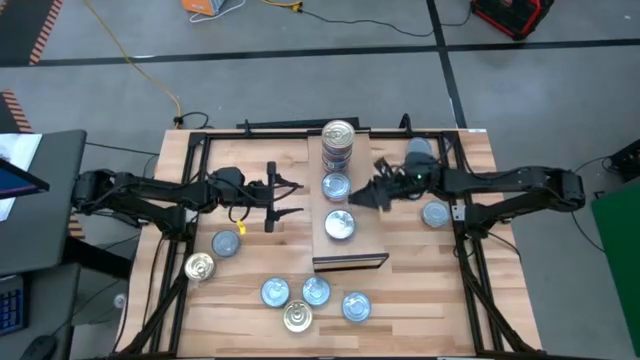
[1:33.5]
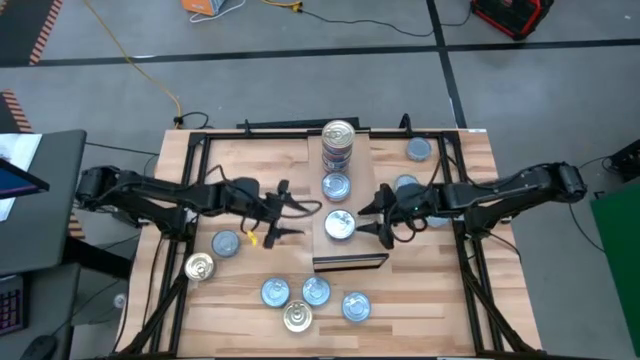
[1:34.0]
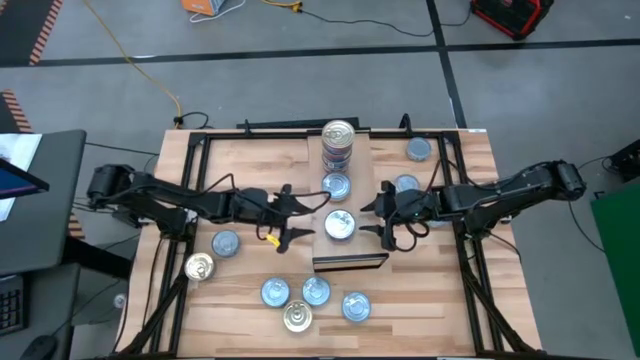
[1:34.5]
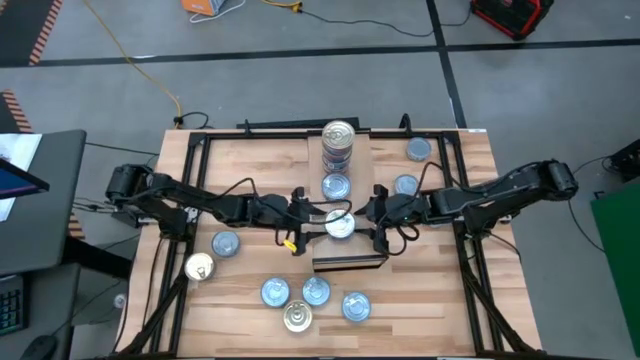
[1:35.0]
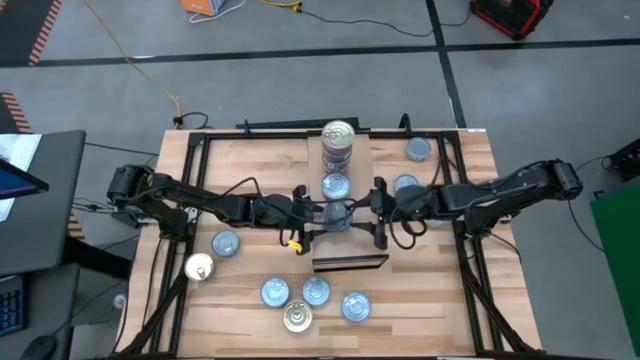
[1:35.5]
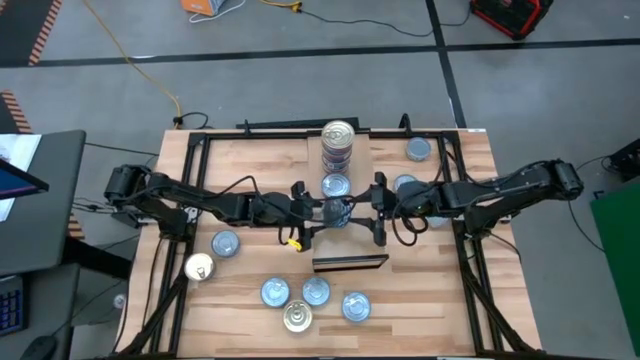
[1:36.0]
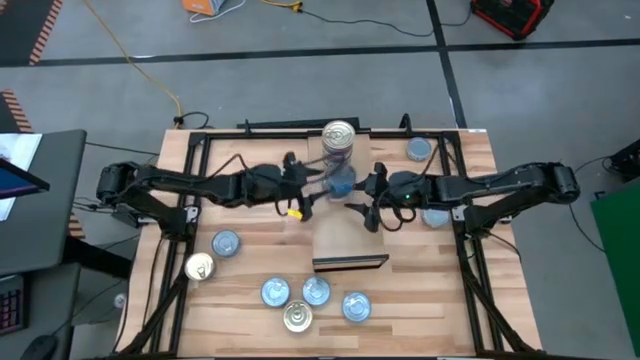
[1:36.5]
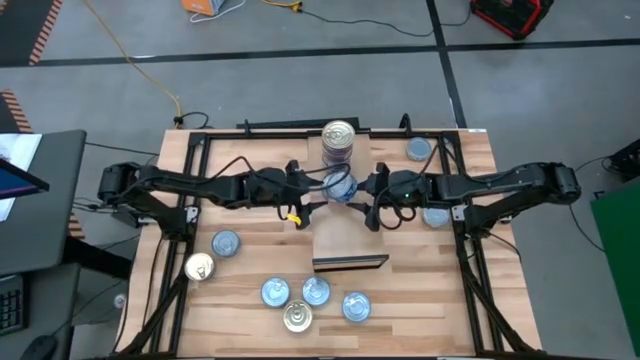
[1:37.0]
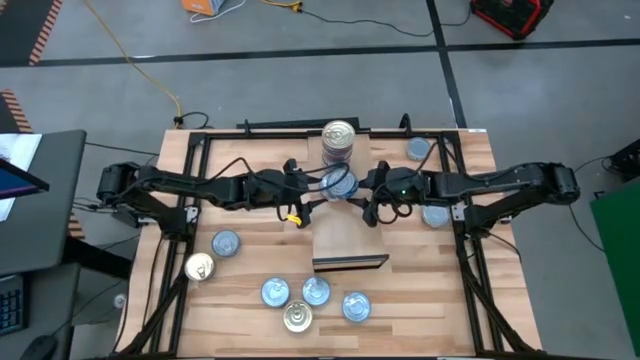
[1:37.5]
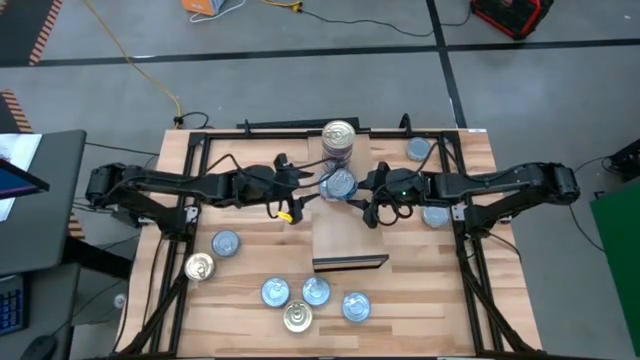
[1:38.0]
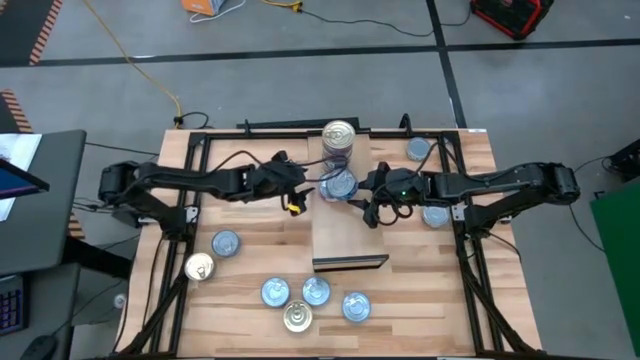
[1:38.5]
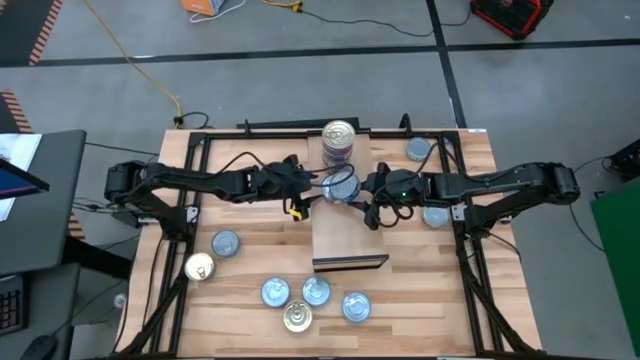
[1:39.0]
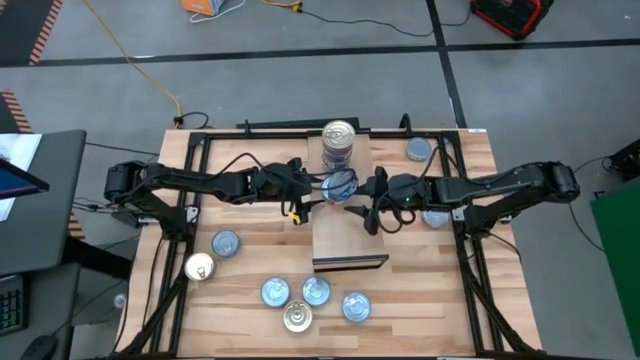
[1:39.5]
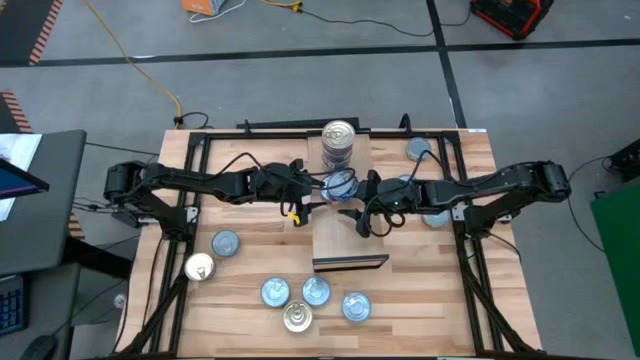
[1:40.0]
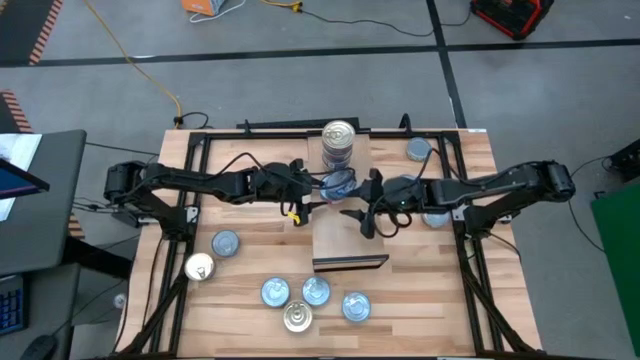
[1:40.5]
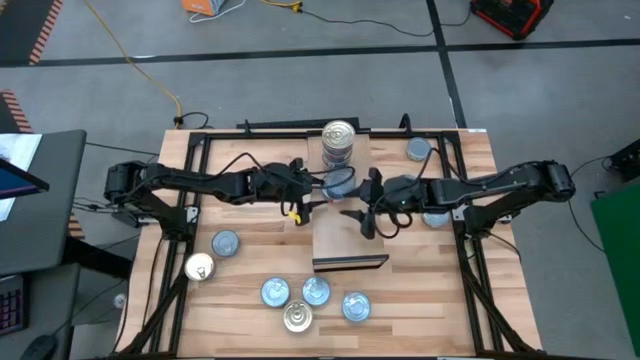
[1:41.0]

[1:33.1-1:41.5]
Task: Stack canned seafood by type on shelf
Stack the blue tuna can on the shelf on top of the red tuna can

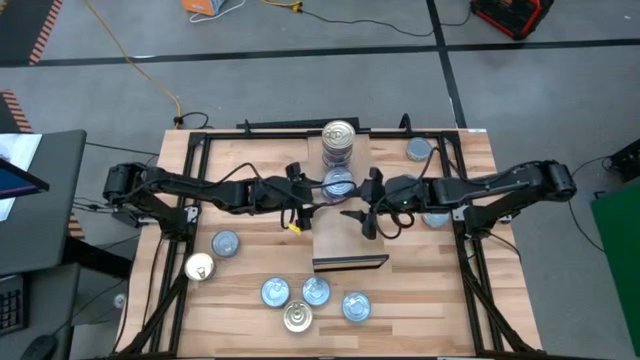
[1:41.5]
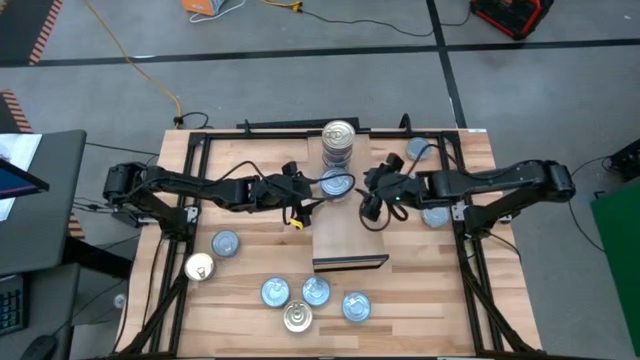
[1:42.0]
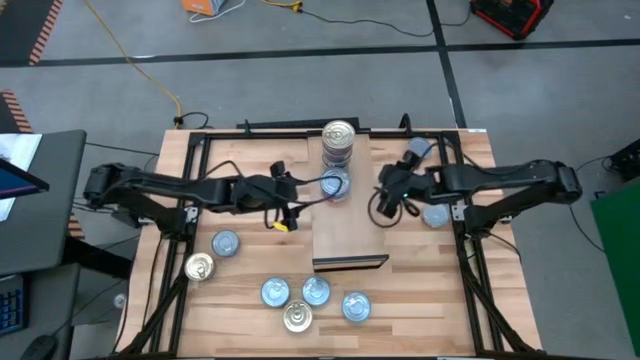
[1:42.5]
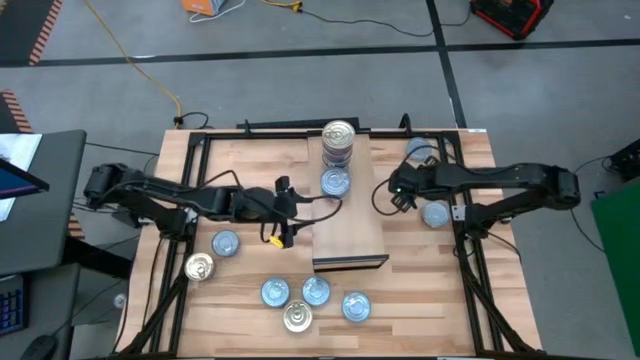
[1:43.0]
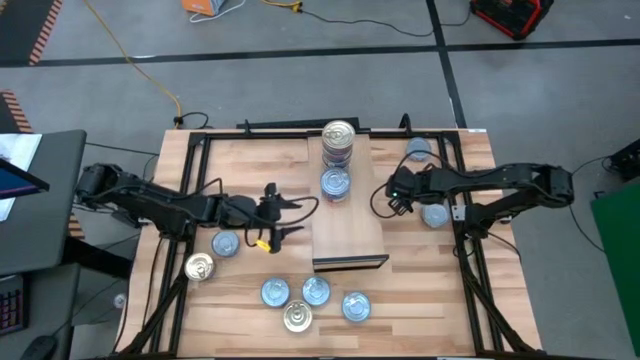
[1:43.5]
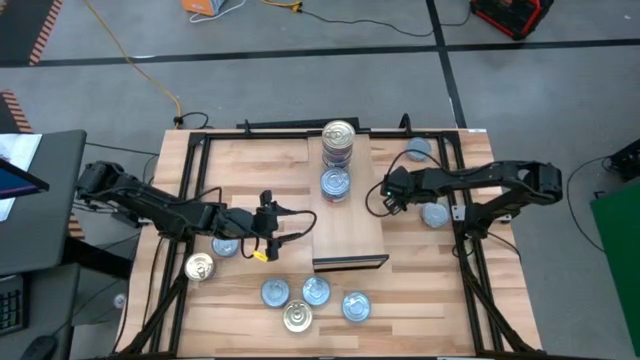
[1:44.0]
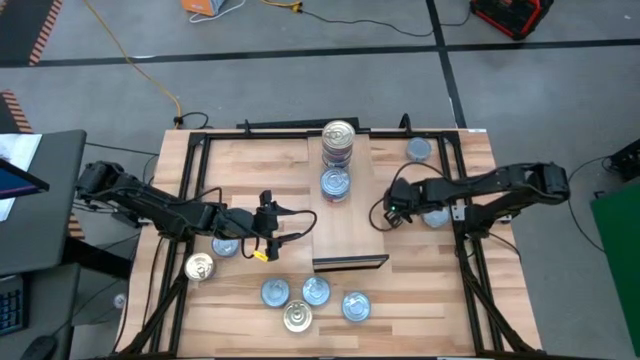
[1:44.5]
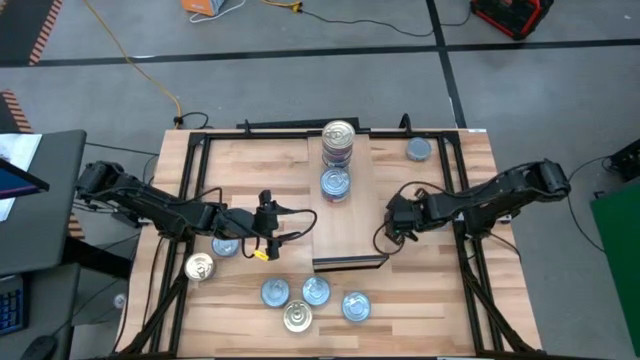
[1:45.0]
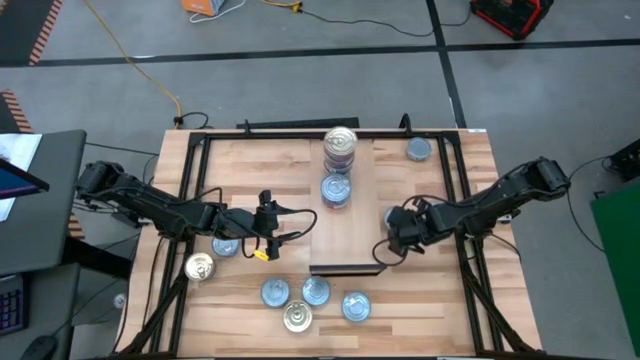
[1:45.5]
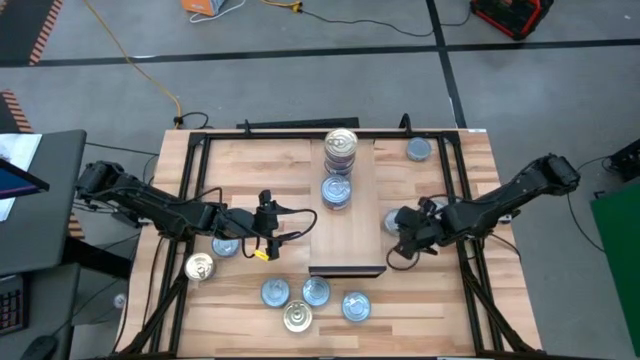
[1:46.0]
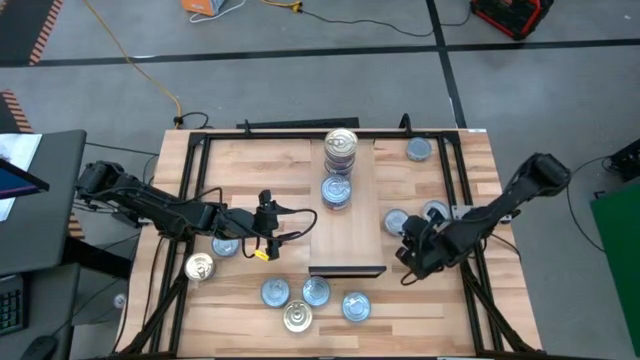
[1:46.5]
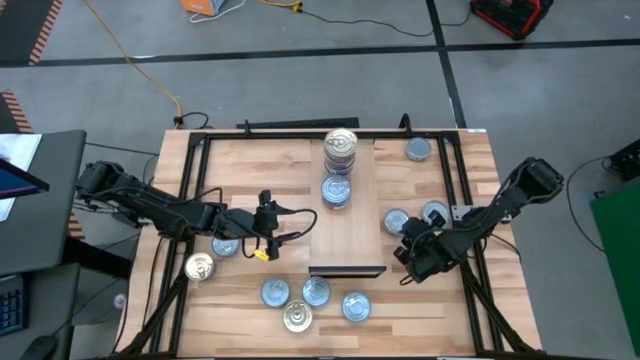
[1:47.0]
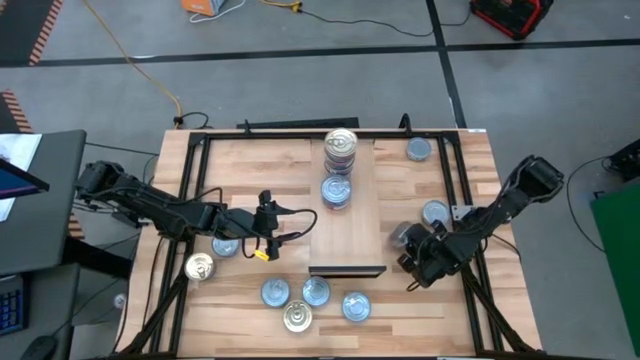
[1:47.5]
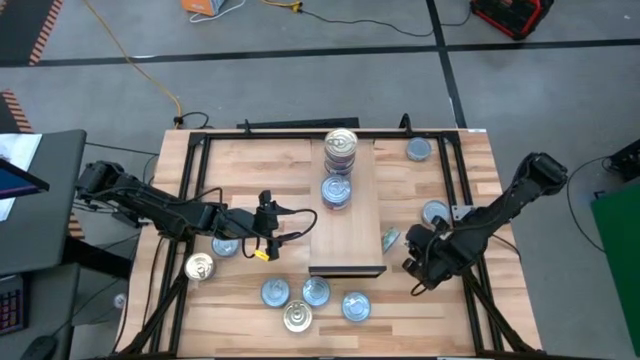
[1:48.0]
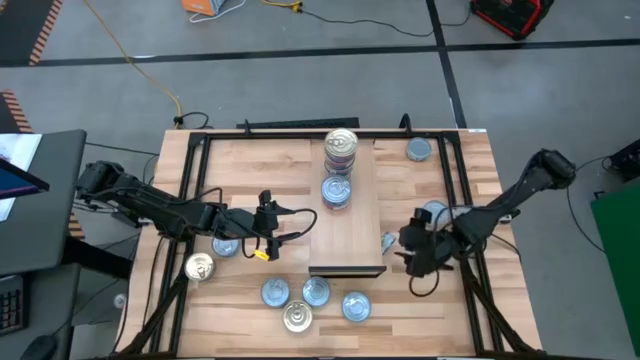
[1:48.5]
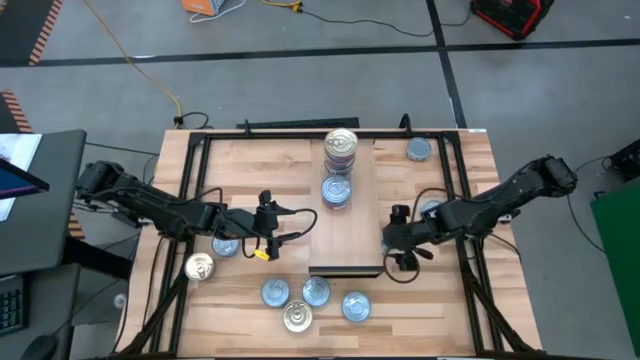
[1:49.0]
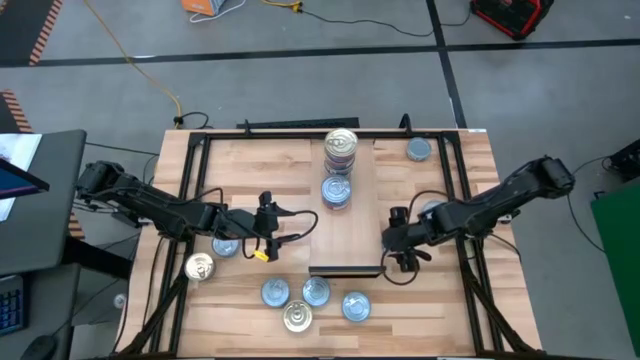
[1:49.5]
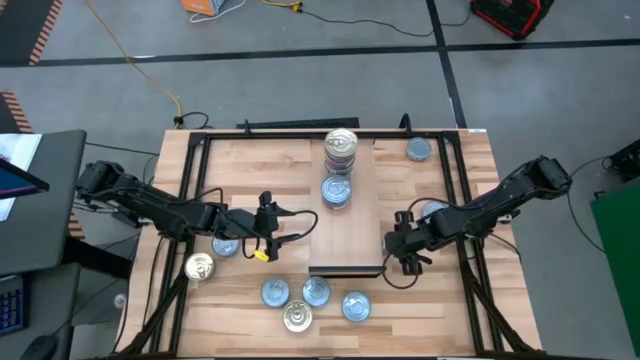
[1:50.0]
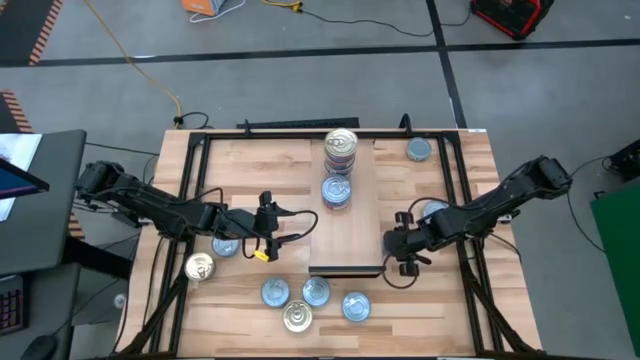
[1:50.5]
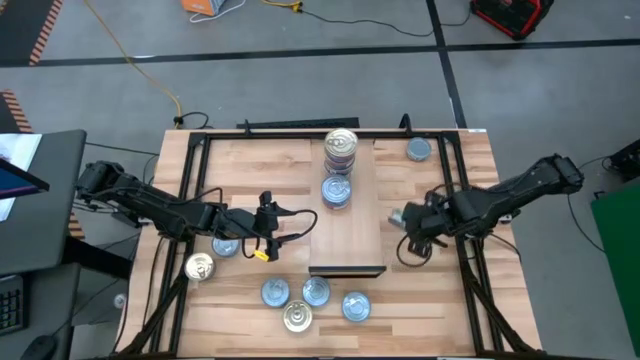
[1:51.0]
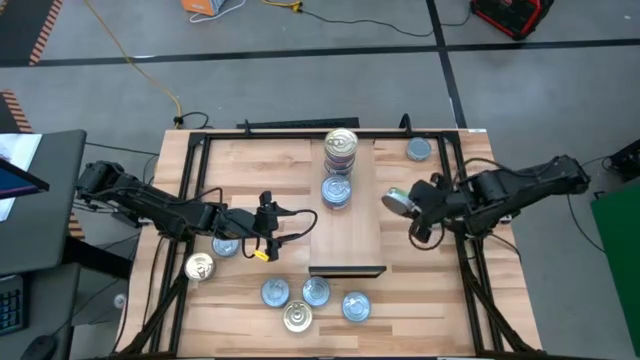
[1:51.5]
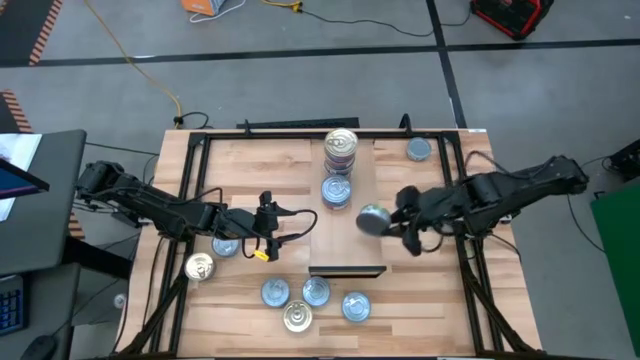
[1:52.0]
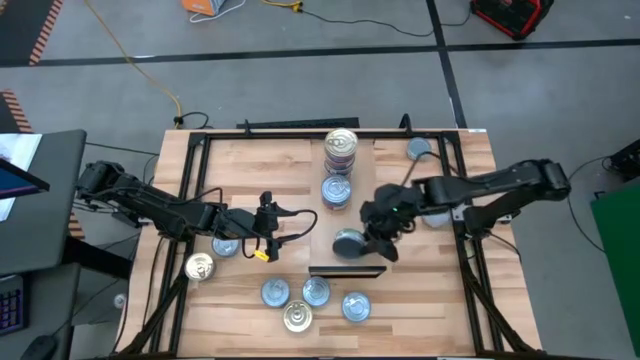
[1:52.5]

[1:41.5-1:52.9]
Put the green and white tuna can on the shelf

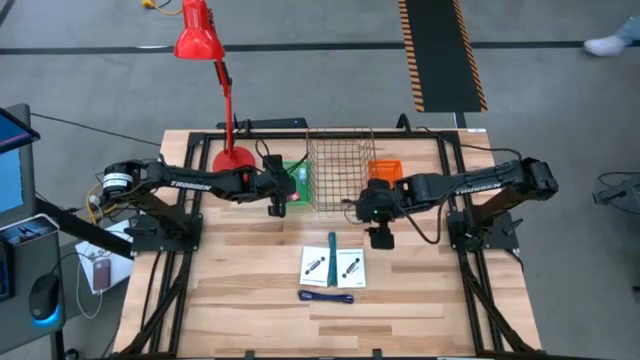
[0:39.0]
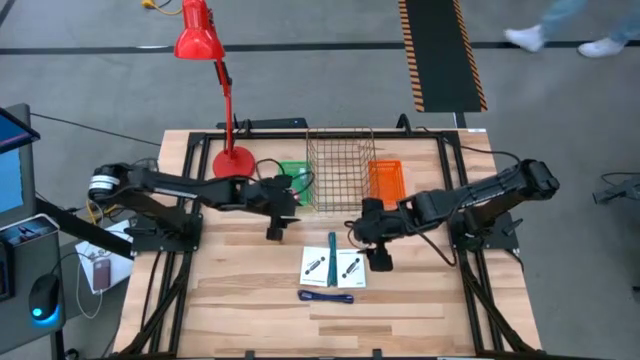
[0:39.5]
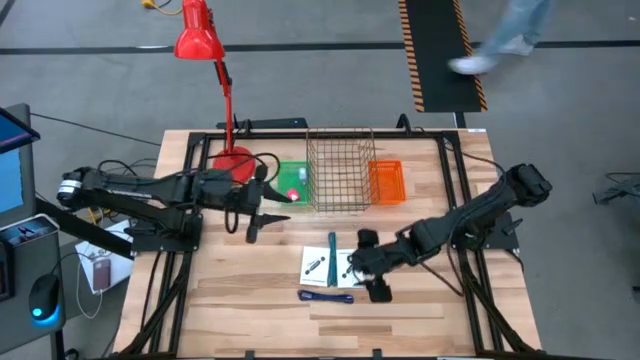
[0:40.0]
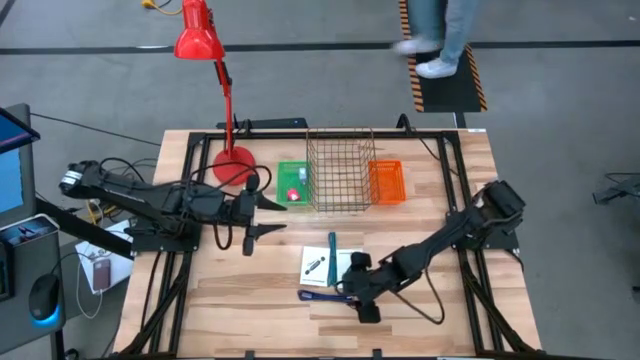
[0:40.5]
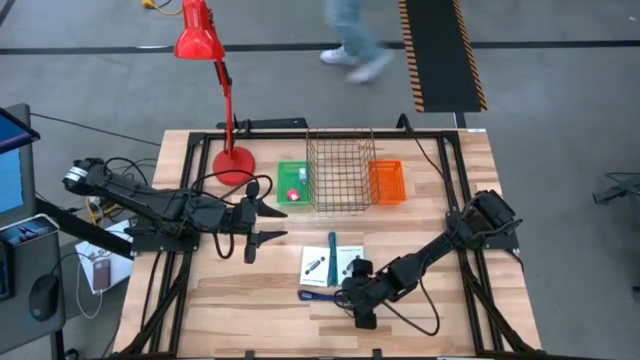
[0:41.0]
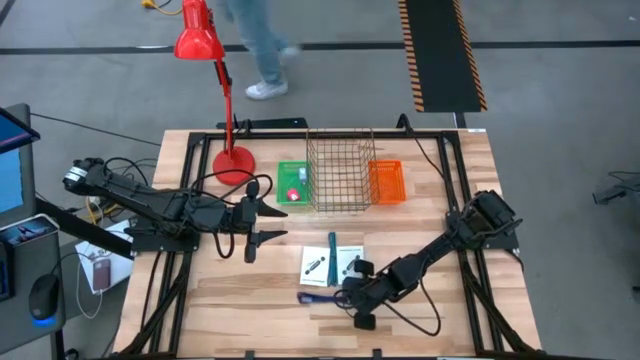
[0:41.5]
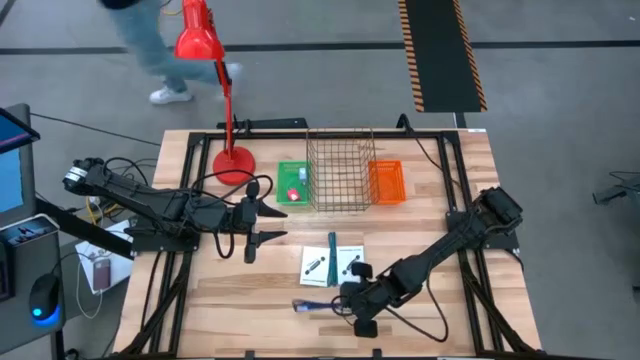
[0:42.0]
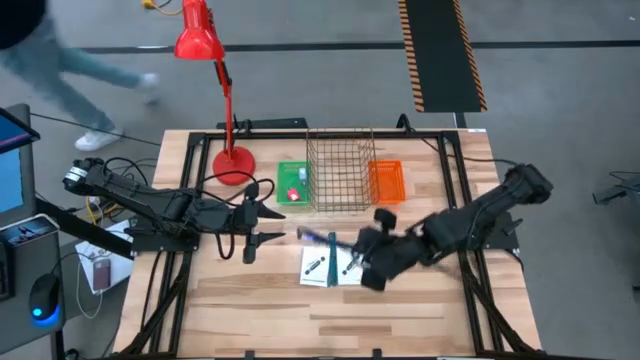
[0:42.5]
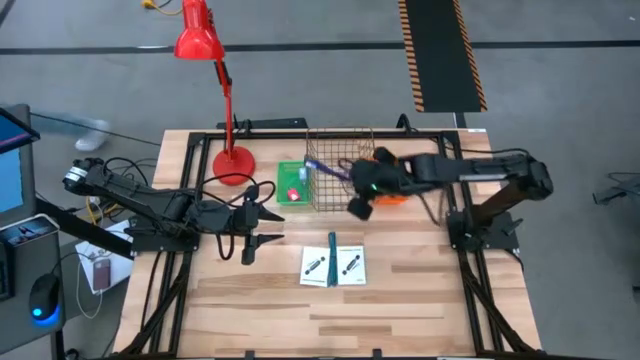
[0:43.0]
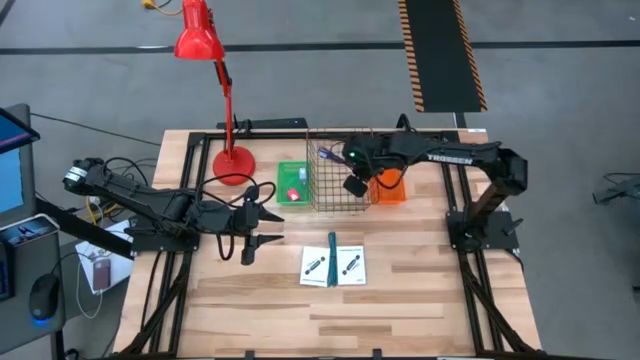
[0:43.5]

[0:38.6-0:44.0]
Task: Pick and place items into bin
Put the violet charger cable into the gold wire bin
